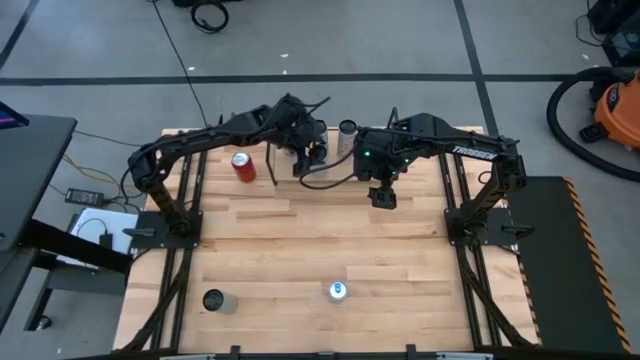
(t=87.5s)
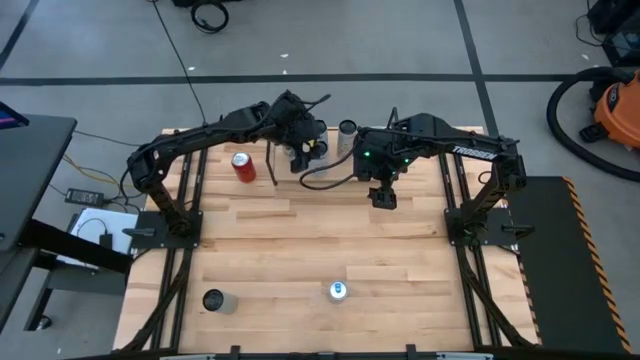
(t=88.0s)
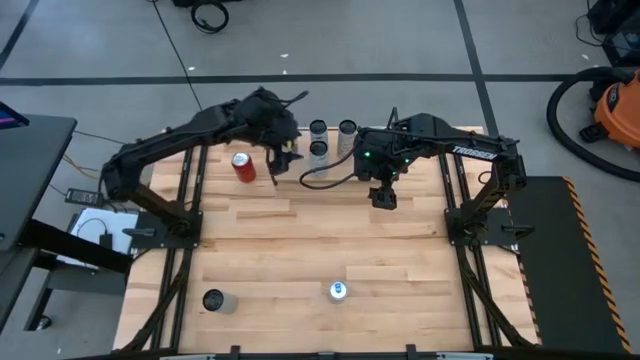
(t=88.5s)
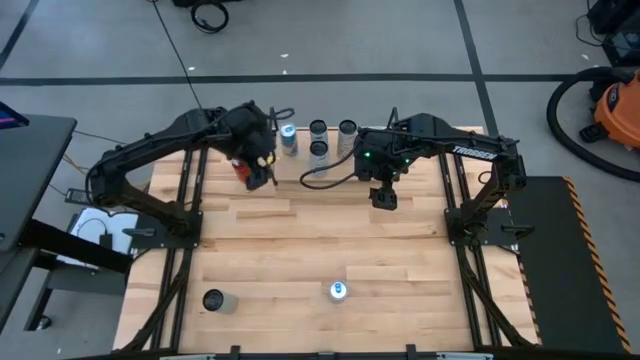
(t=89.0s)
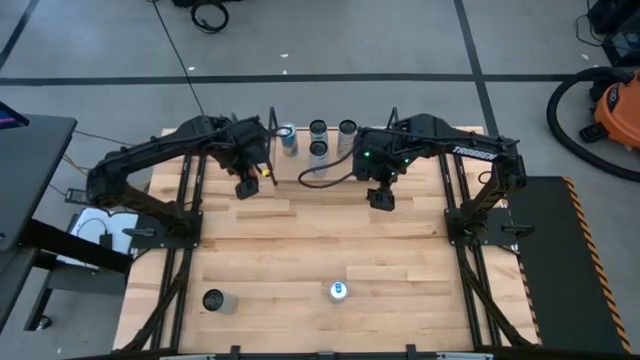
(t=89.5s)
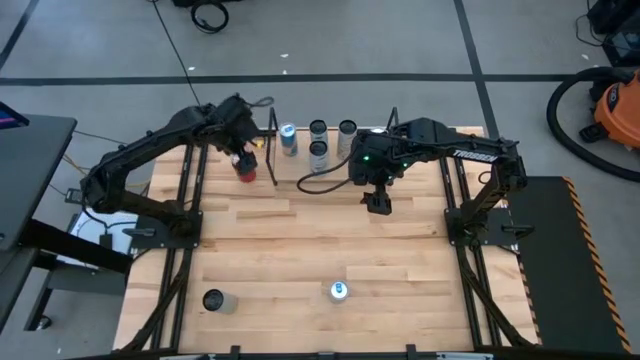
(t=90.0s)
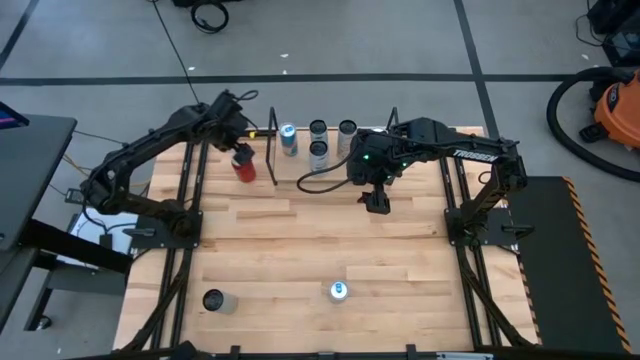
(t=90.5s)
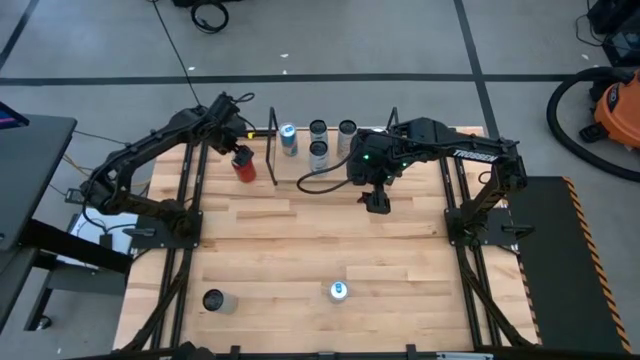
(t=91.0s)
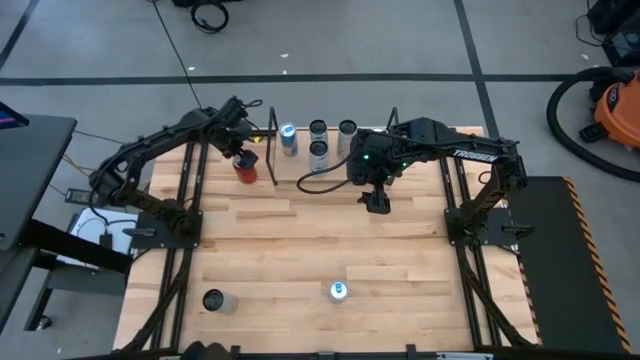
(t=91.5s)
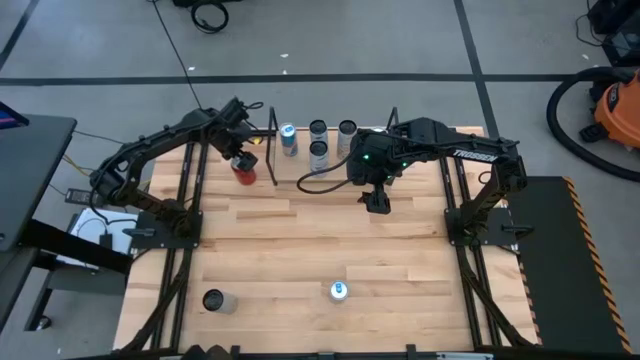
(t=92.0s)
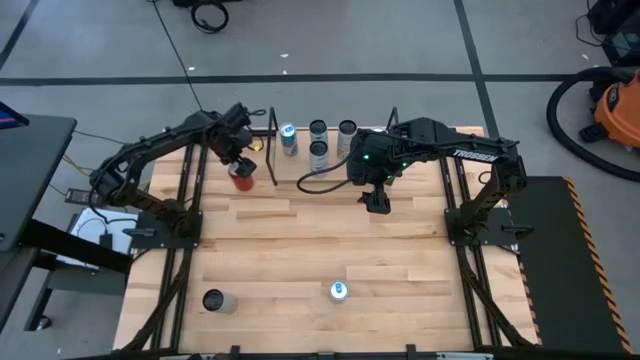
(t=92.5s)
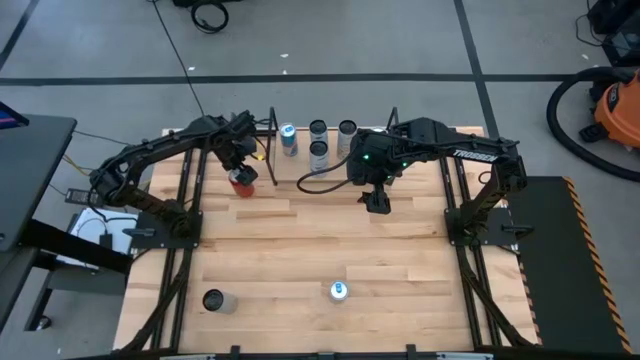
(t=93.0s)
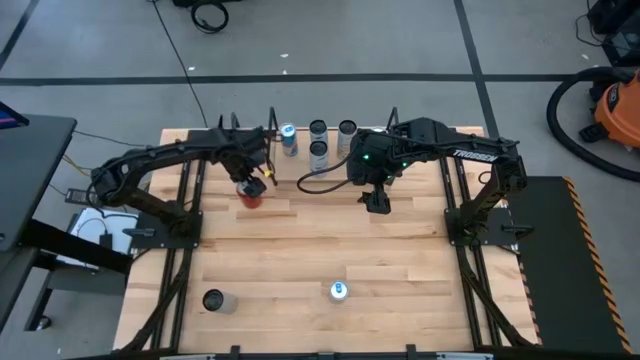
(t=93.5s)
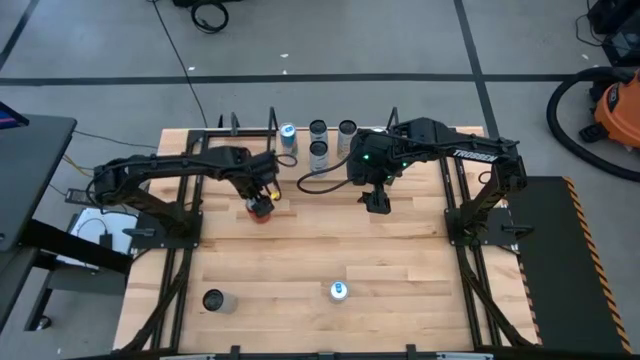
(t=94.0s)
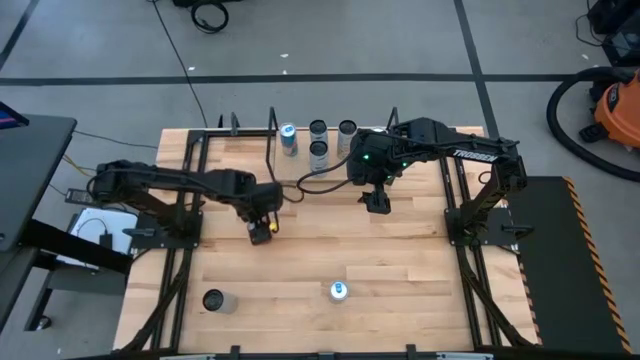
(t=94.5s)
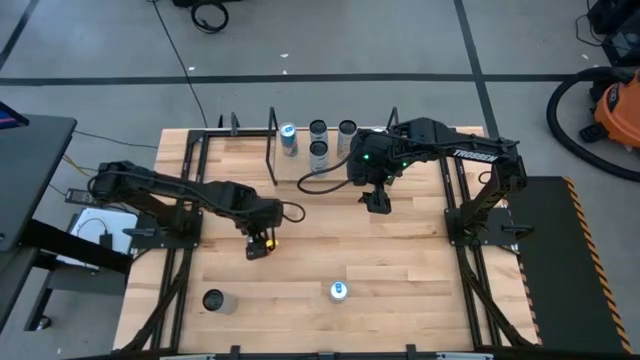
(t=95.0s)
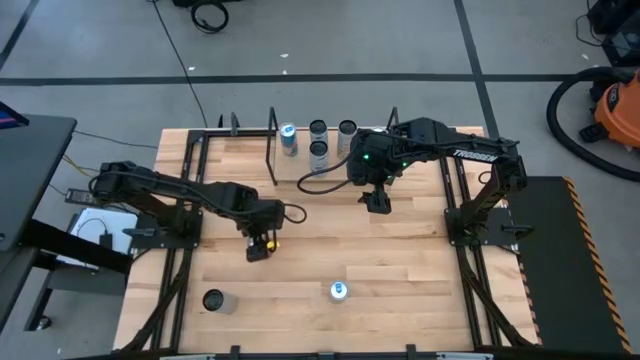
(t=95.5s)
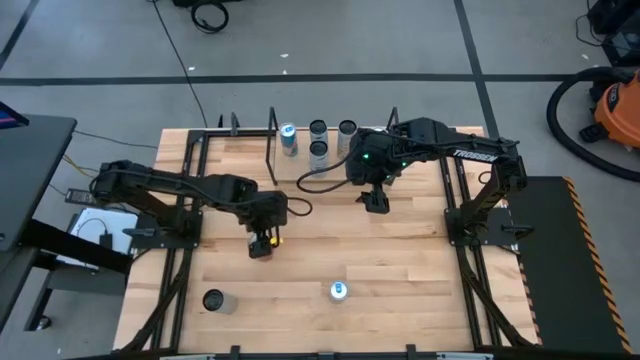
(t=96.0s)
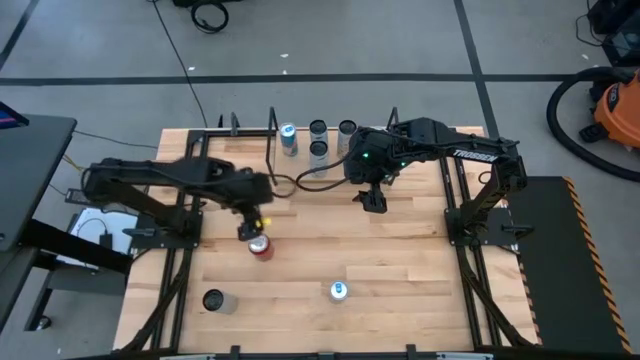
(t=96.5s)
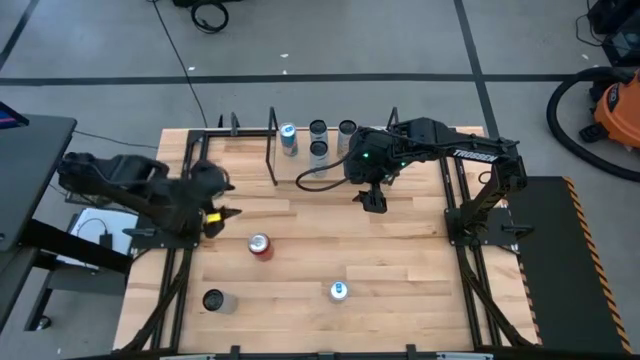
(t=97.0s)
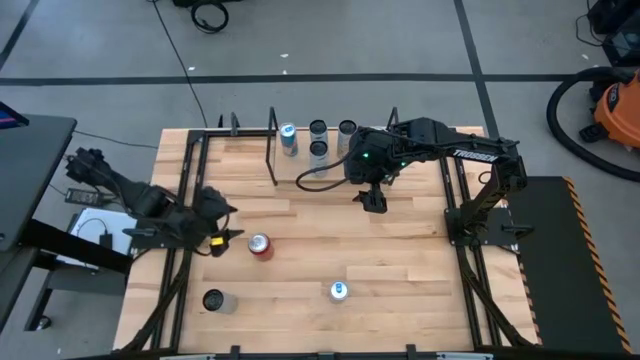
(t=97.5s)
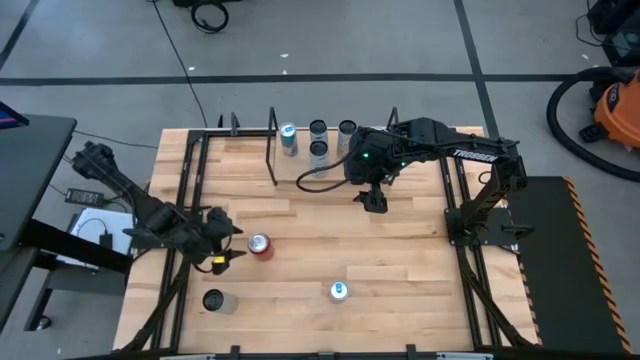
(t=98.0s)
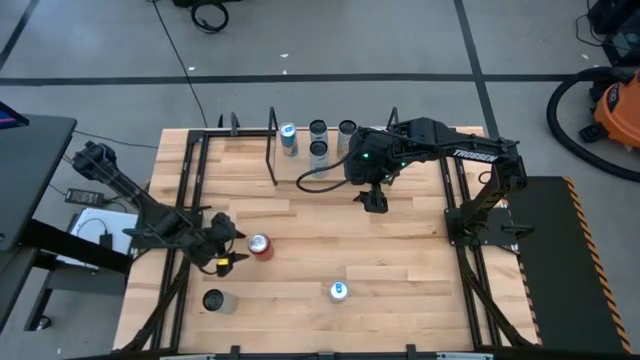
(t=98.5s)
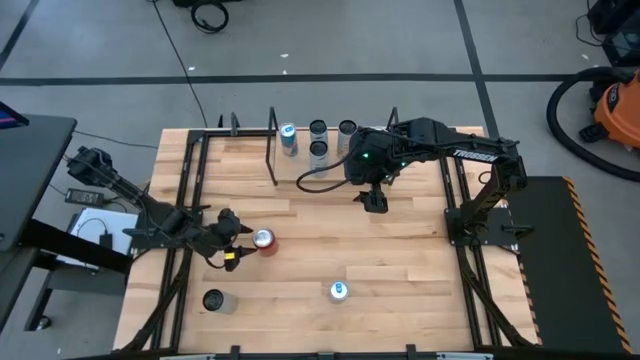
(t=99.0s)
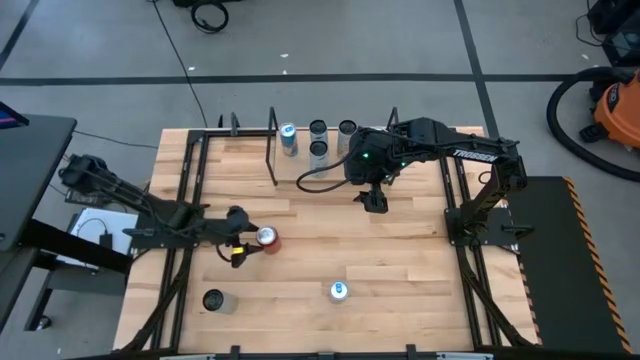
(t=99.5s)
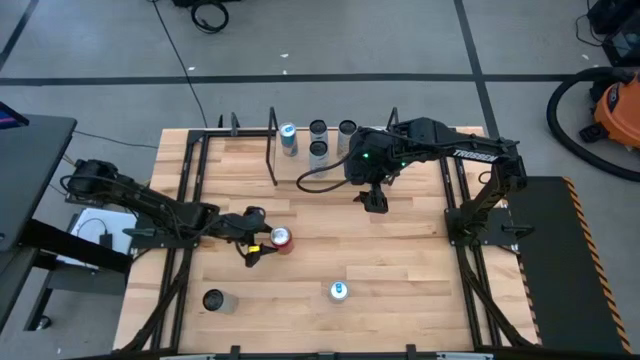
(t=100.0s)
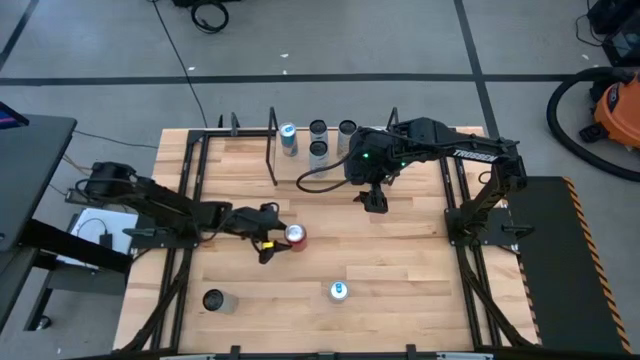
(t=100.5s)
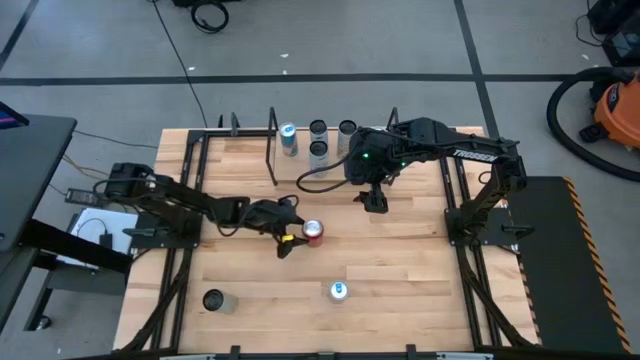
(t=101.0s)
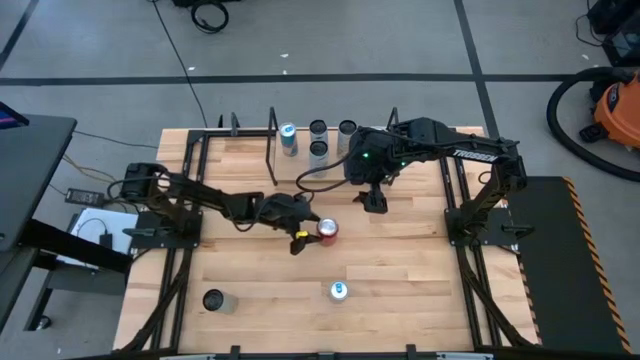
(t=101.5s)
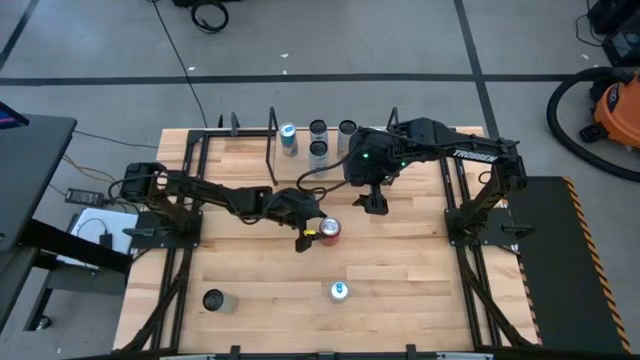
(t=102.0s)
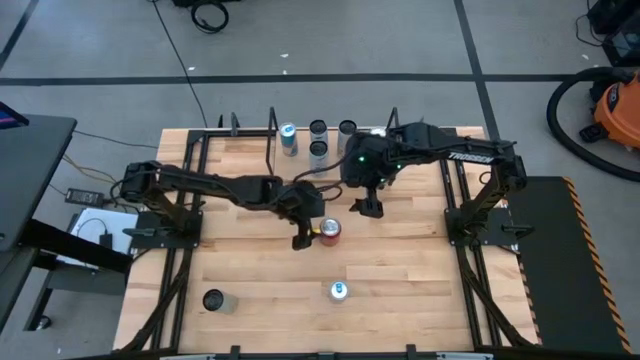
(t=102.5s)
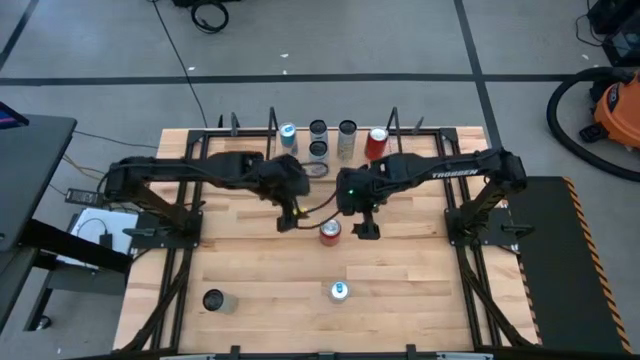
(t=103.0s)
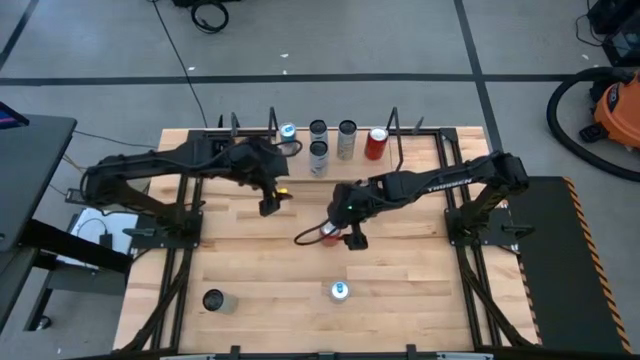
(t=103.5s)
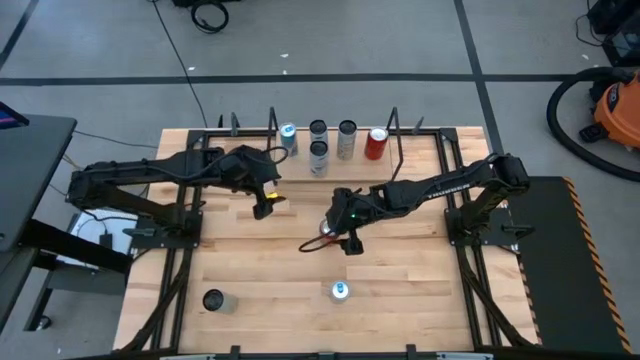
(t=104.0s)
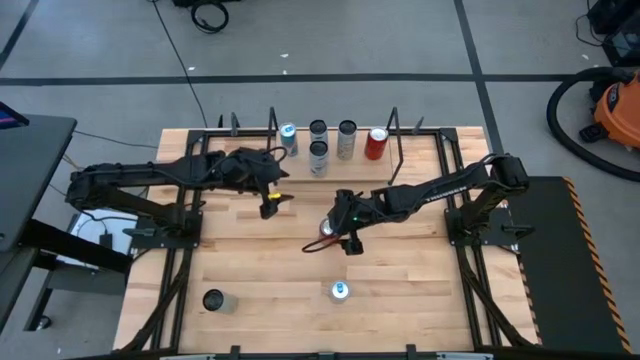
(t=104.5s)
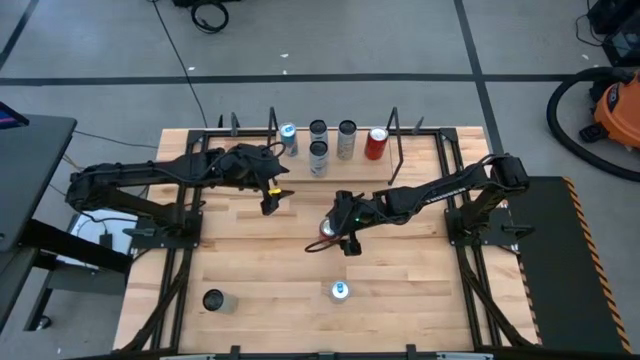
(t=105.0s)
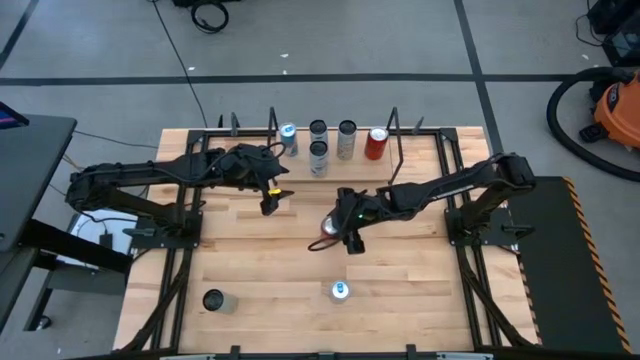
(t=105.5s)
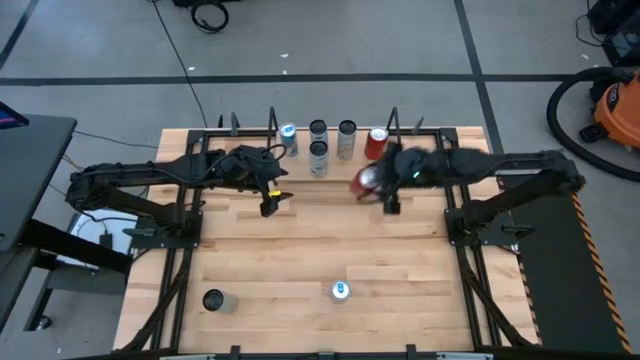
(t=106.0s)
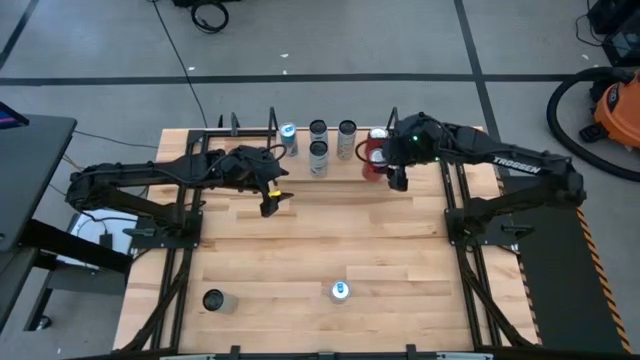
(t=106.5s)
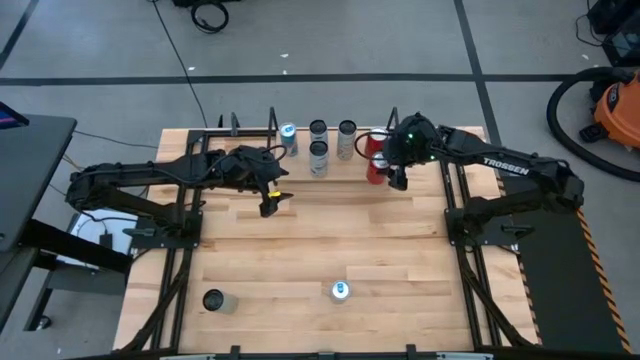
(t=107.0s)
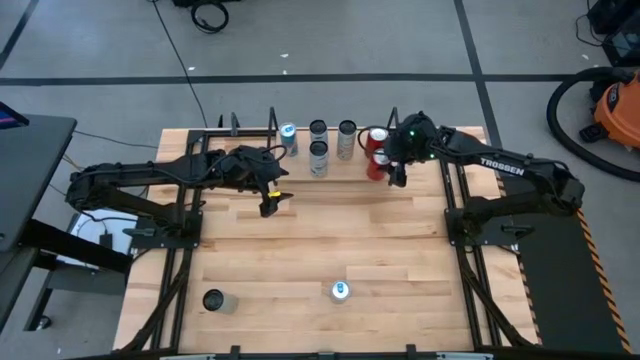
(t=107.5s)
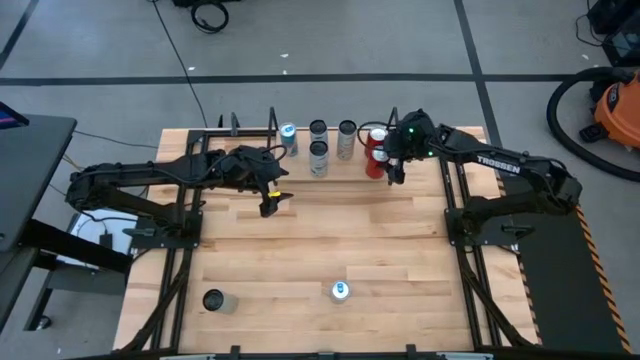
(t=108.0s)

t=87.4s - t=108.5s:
Task: Place canned beverage on shelf
Put the red-black soda can aligned with the other red-black soda can on the shelf
